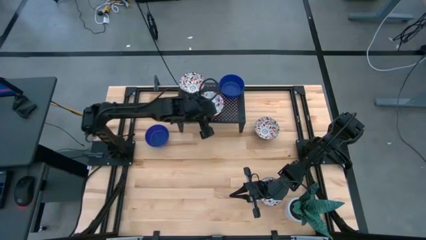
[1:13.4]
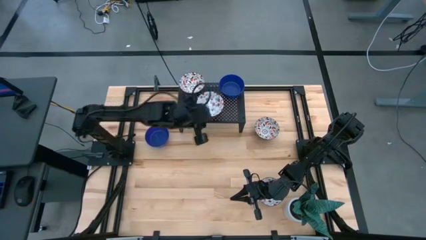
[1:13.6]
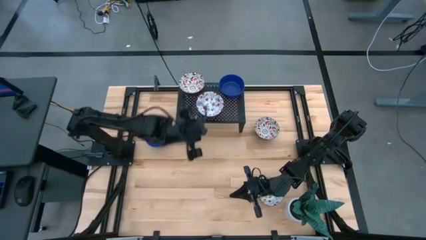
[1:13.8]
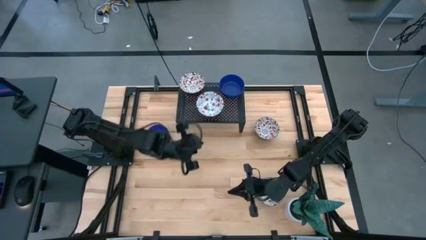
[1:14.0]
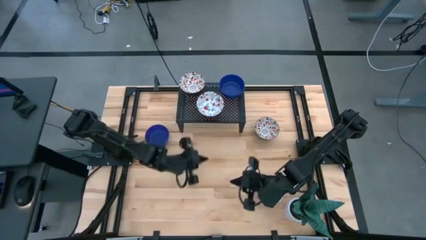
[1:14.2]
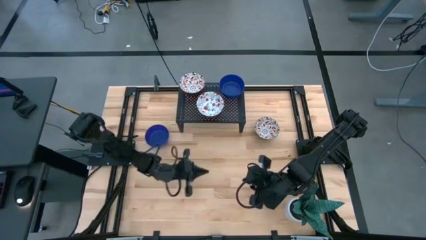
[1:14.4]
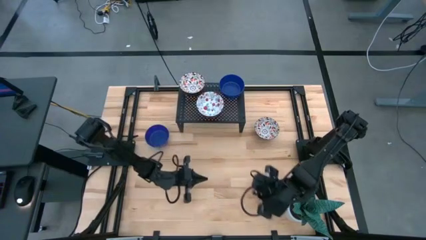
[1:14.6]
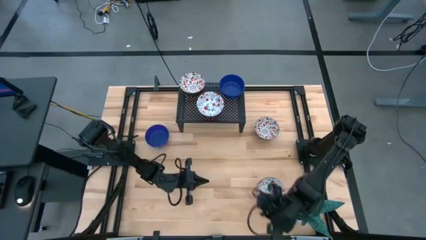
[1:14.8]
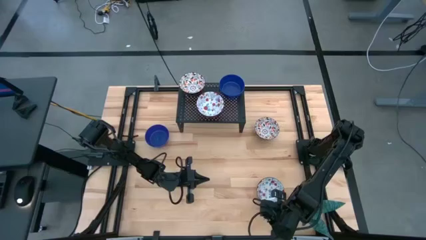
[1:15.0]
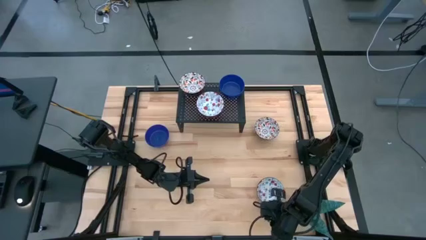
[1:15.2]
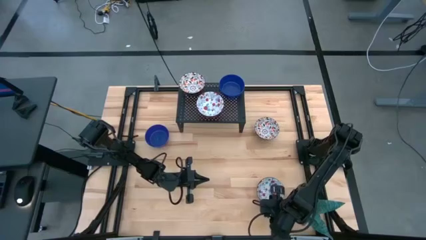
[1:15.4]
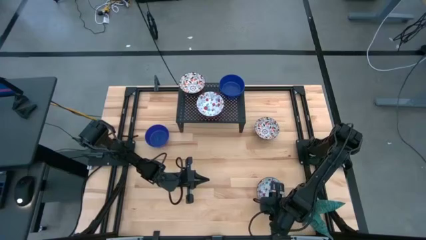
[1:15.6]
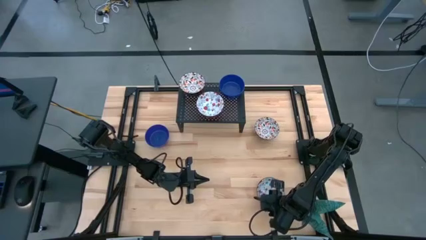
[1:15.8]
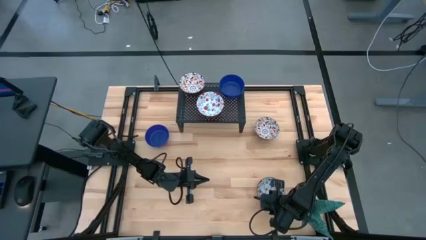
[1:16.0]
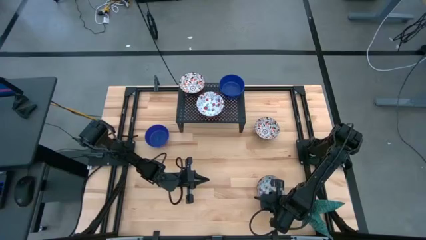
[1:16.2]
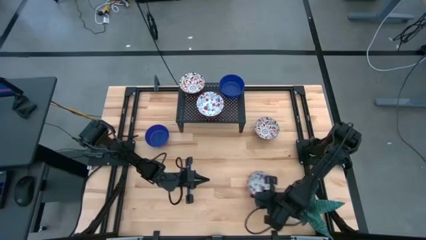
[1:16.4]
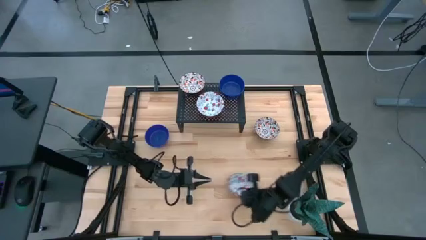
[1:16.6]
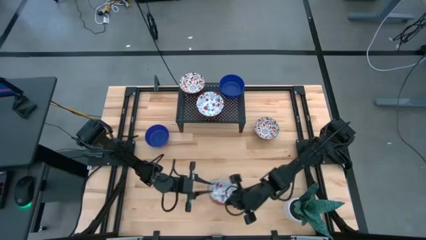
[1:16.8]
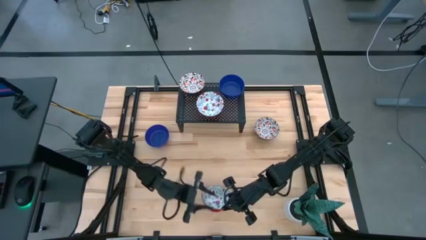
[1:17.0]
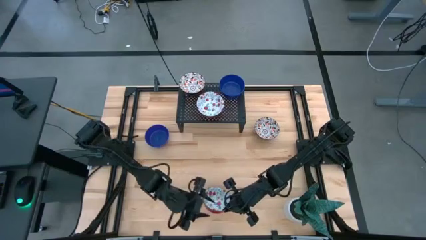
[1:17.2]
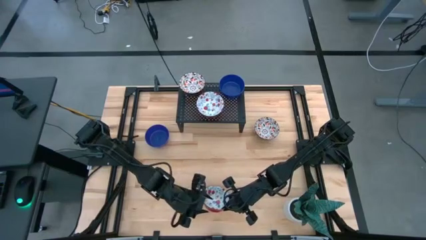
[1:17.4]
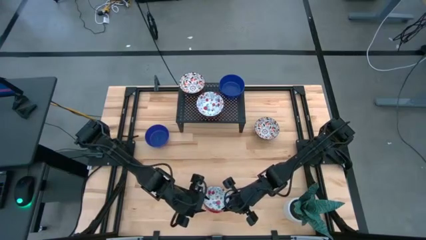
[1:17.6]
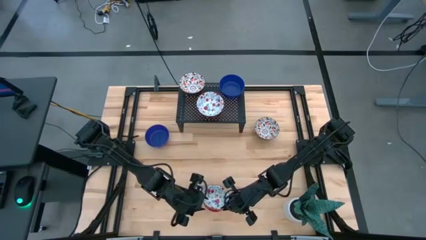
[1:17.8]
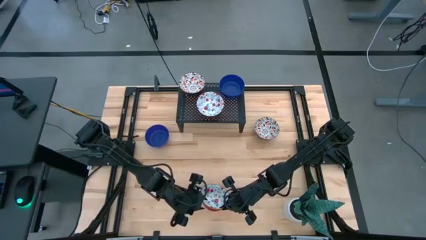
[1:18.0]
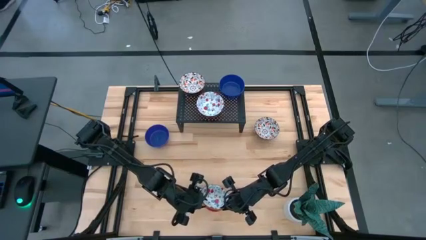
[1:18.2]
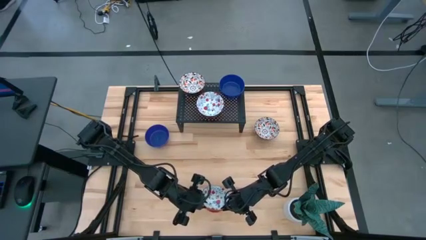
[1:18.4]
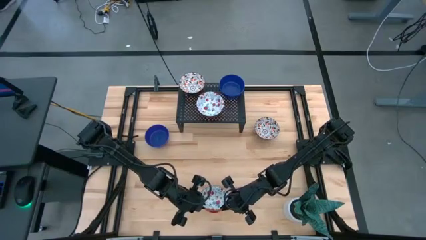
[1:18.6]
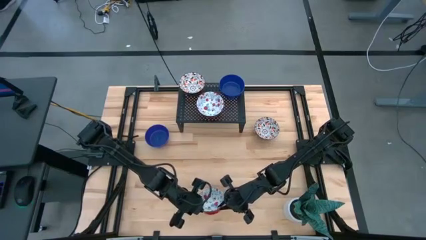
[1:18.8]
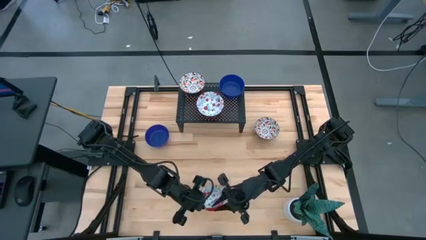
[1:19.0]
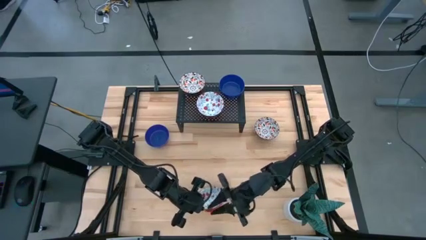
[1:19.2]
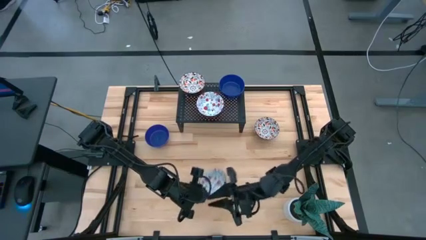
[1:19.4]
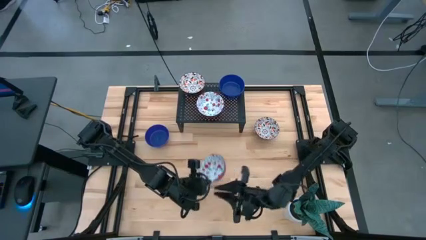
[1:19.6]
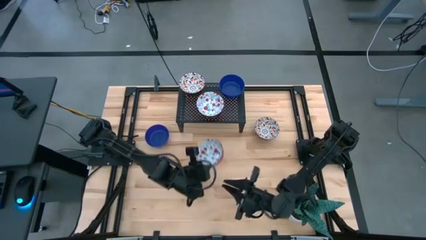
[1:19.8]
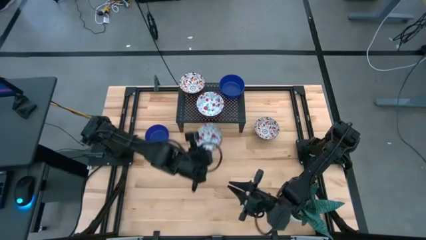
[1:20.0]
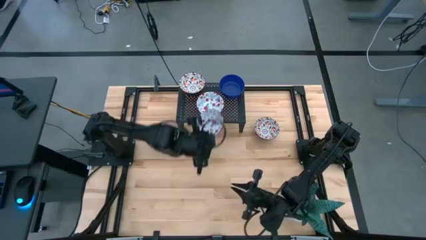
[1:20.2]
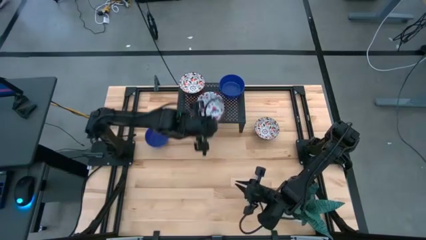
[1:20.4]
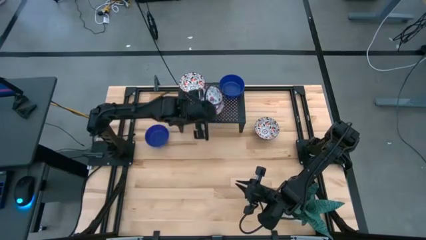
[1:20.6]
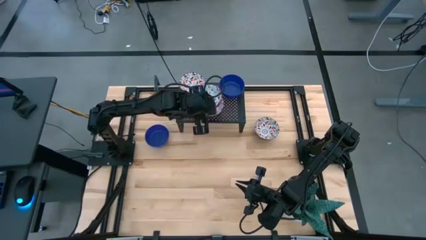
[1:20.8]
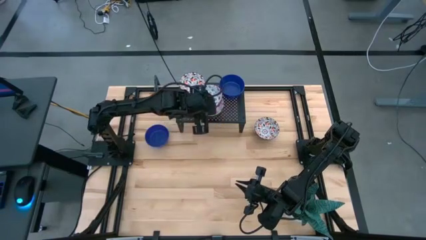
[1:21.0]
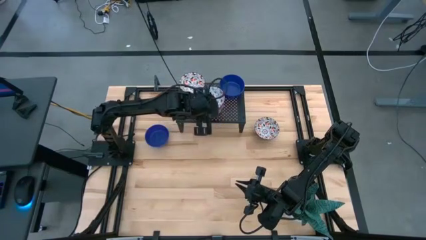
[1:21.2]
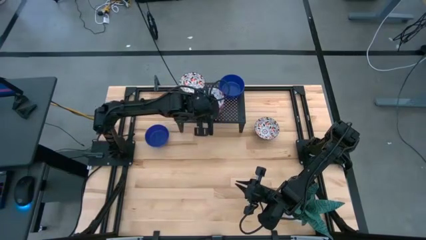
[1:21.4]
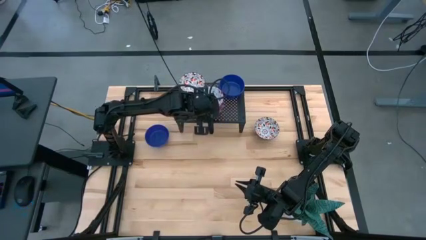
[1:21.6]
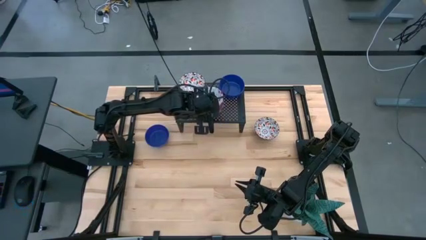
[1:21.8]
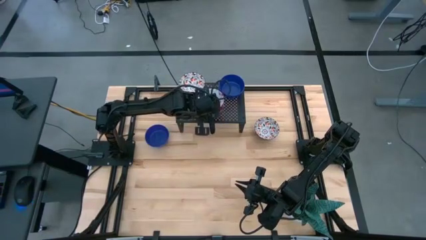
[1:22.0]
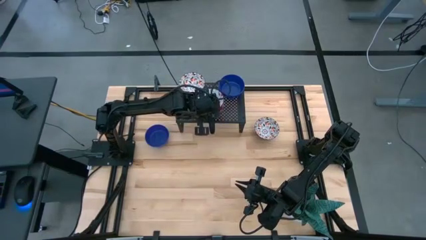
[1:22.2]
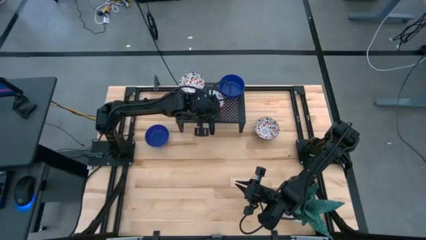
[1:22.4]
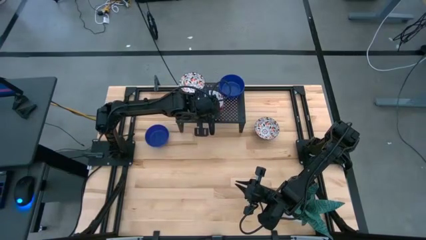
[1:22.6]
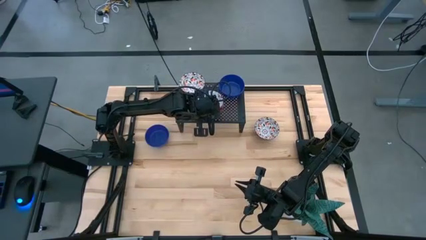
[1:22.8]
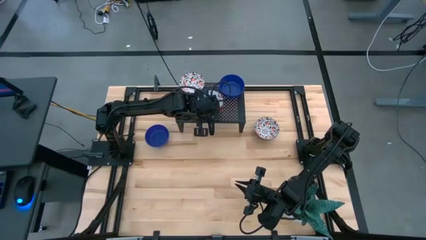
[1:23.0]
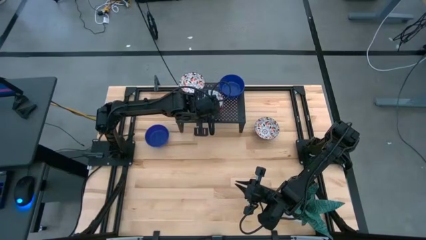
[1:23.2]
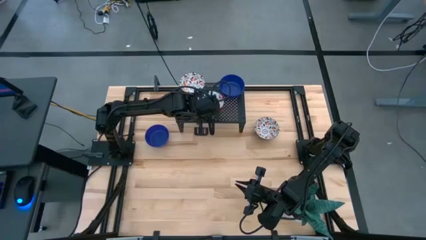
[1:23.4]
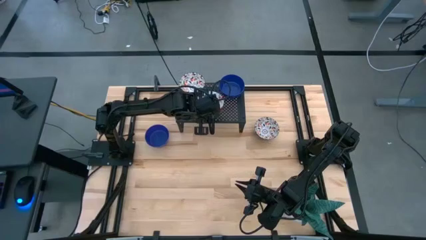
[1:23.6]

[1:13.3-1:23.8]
Task: Pick & Place Mini bowls
Stack the red bowl on the red bowl on the shelf

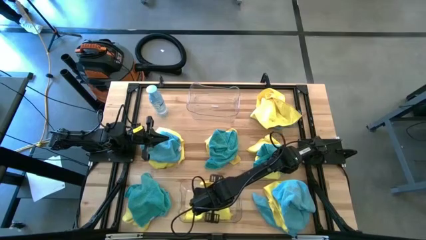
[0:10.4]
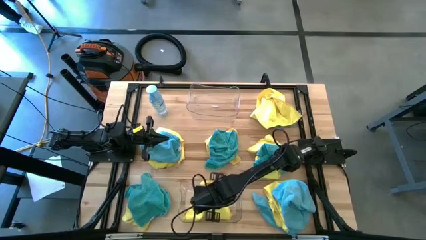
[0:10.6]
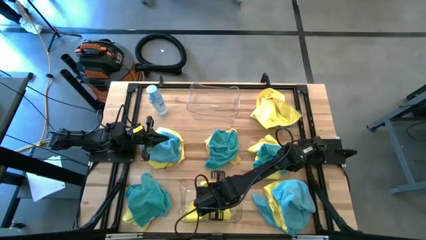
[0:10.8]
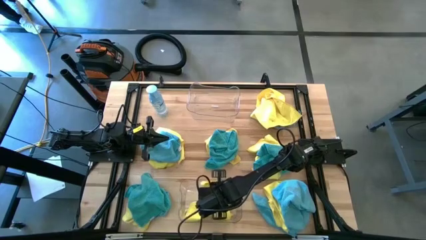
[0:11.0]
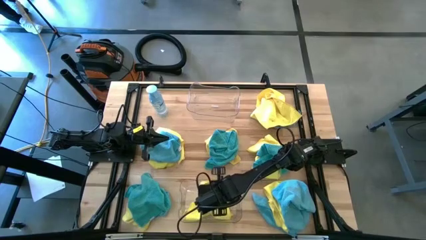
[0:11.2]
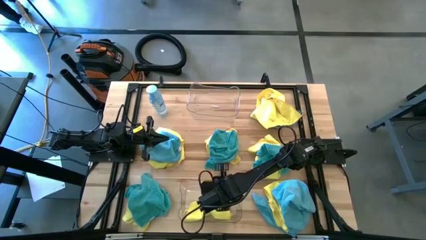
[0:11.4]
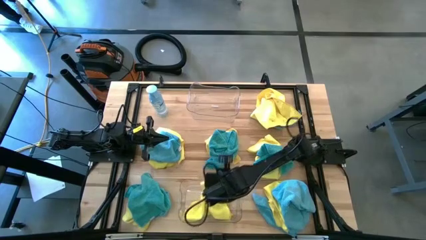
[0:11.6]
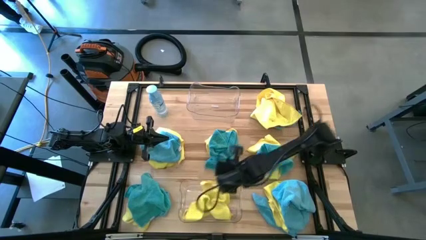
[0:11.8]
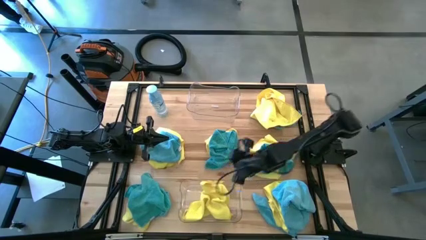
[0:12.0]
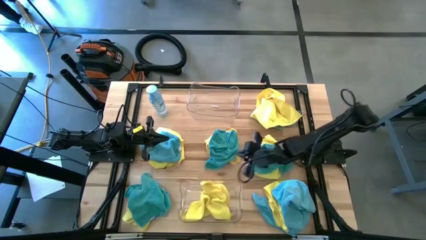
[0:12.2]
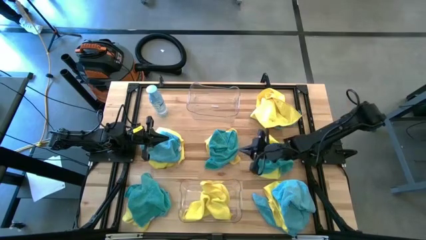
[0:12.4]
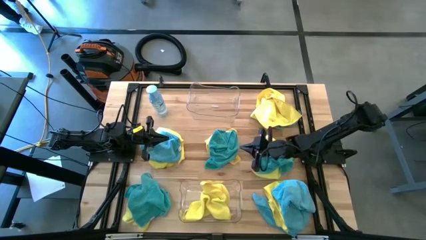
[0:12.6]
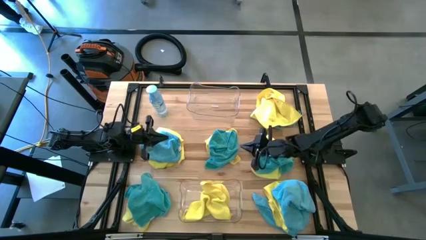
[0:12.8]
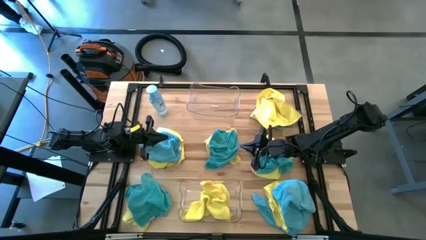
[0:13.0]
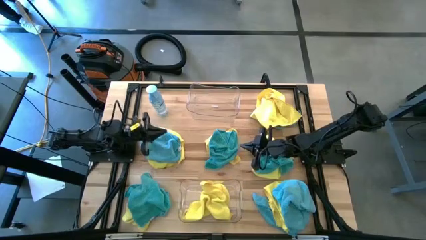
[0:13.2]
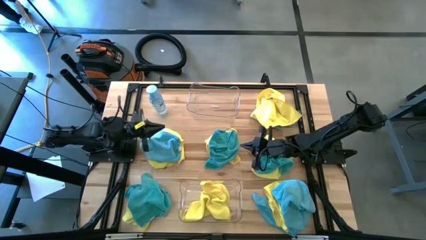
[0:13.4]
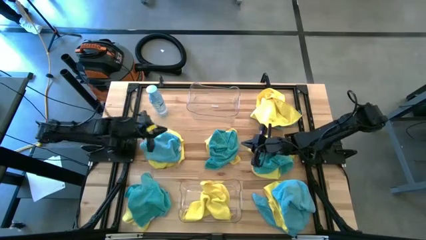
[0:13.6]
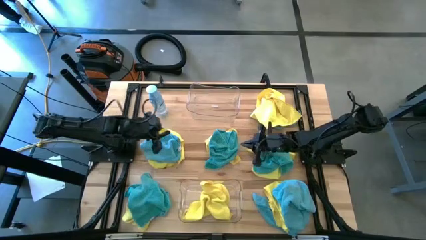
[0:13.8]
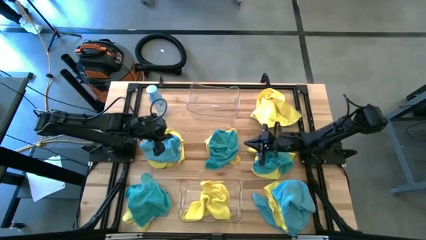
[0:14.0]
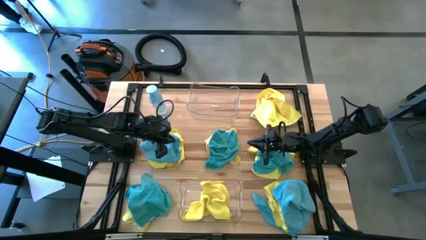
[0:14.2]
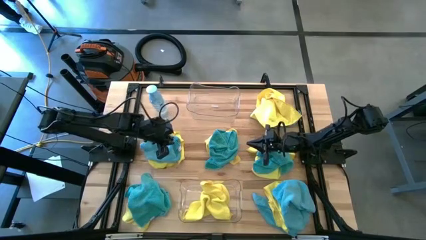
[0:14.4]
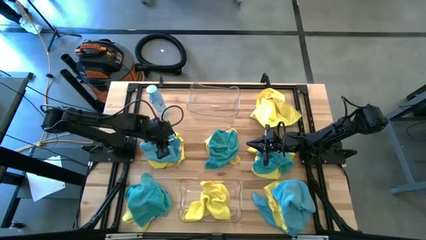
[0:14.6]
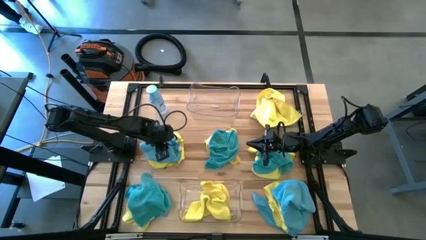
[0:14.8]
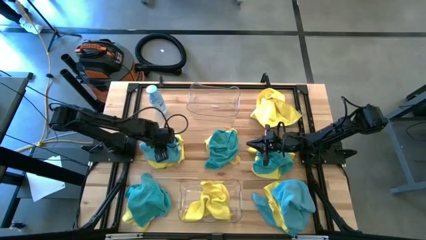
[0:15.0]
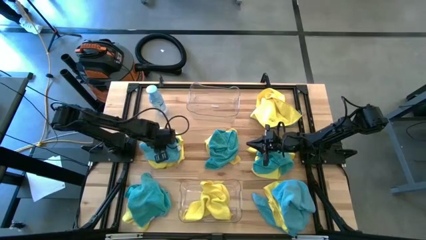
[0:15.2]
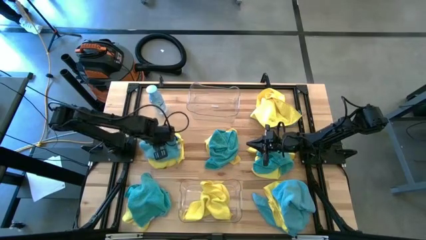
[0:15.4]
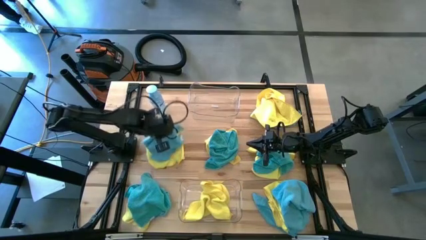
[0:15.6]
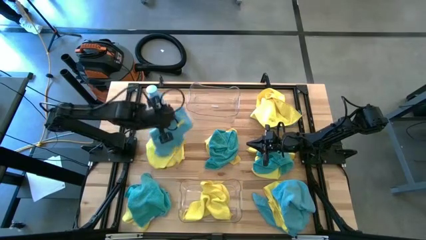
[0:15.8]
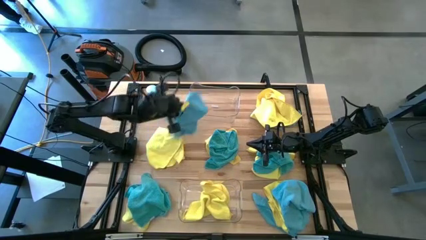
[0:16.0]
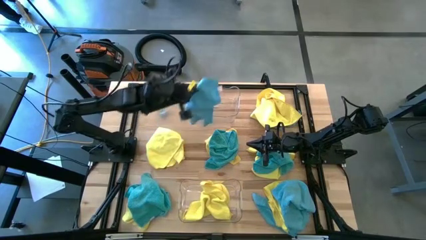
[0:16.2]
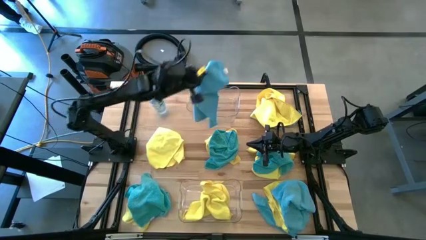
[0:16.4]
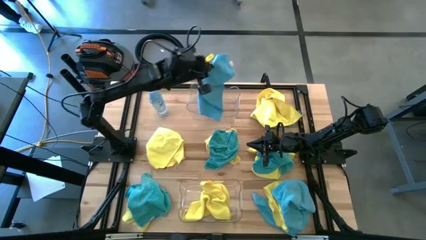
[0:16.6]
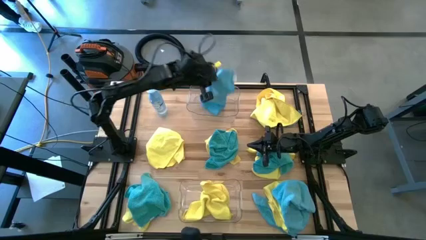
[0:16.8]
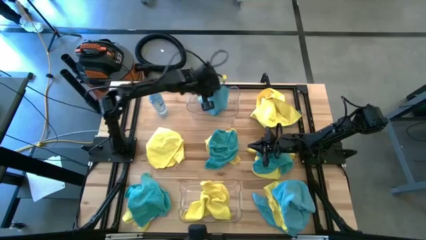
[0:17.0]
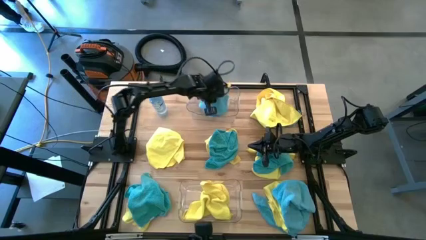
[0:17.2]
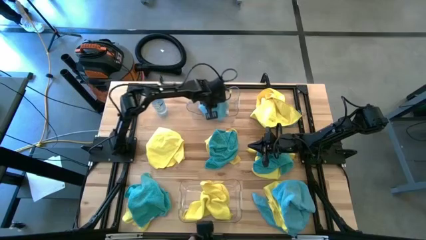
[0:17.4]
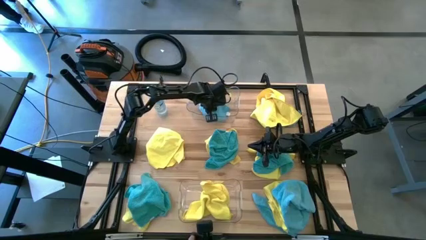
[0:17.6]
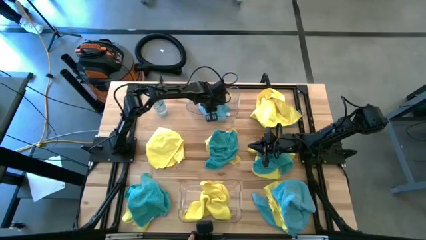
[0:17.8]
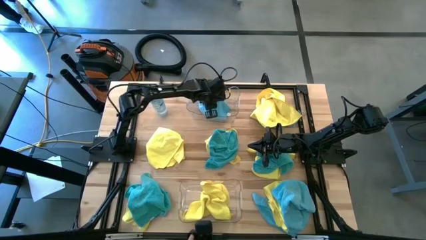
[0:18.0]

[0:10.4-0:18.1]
Task: Sort microfiber towel by color & place in baskets
Put the blue towel into the top transparent bin
